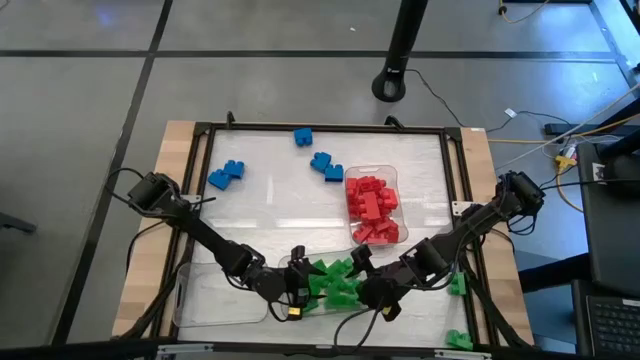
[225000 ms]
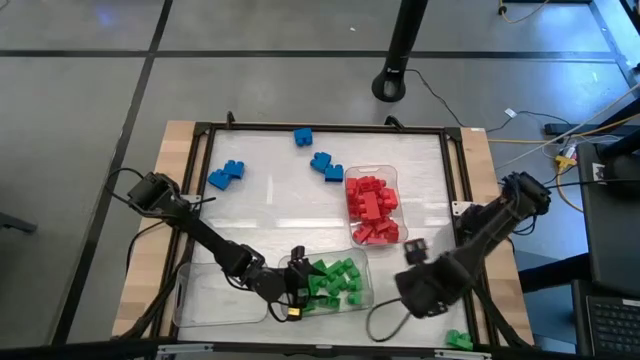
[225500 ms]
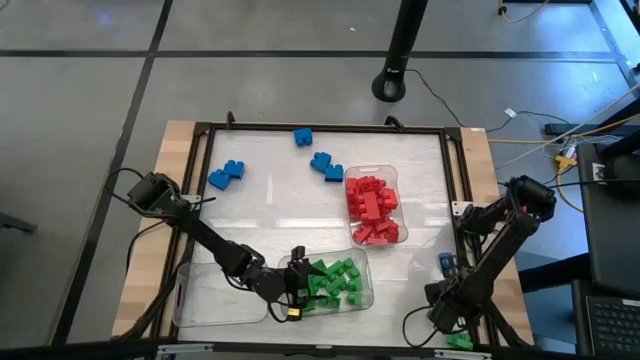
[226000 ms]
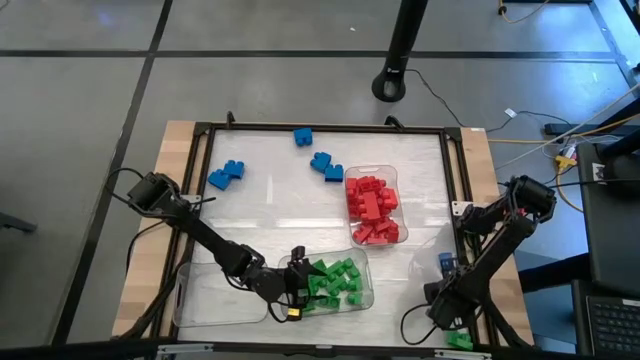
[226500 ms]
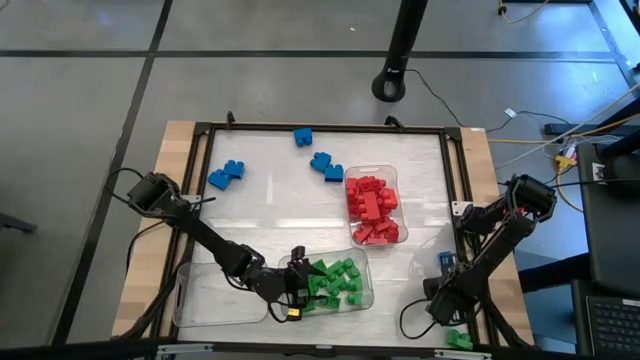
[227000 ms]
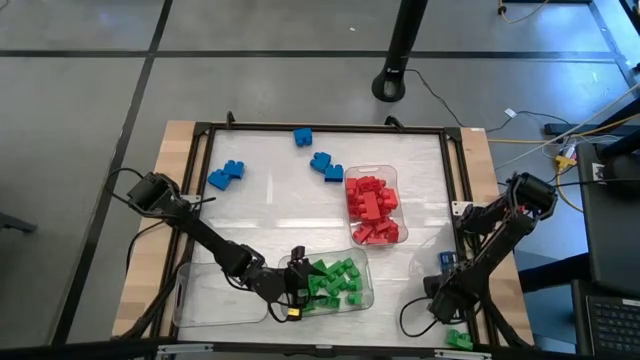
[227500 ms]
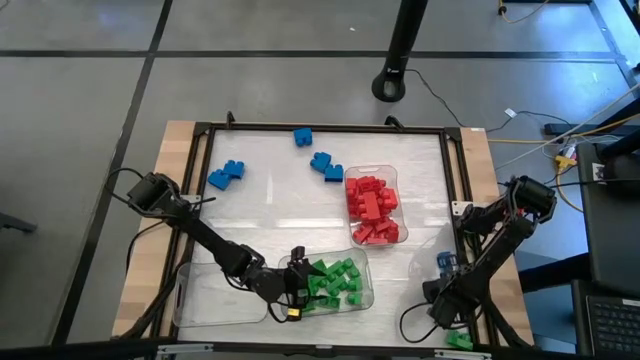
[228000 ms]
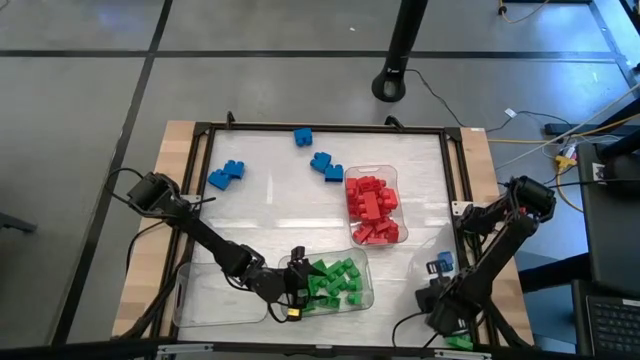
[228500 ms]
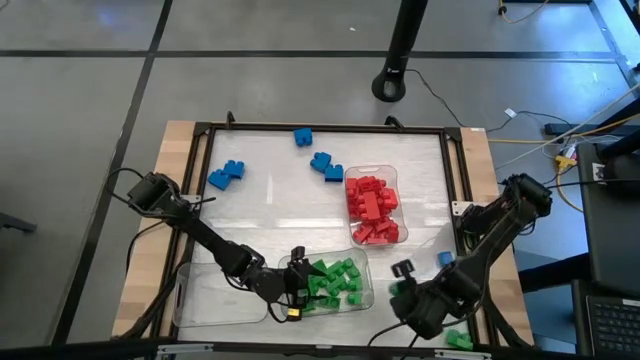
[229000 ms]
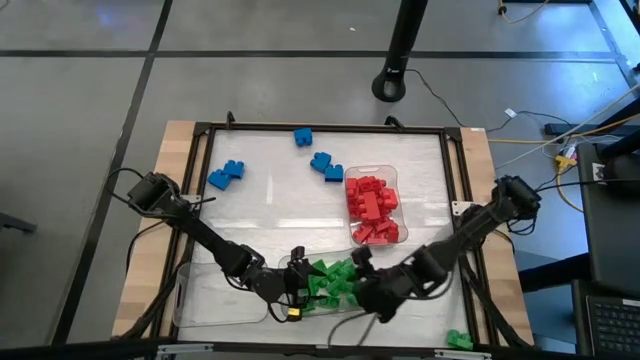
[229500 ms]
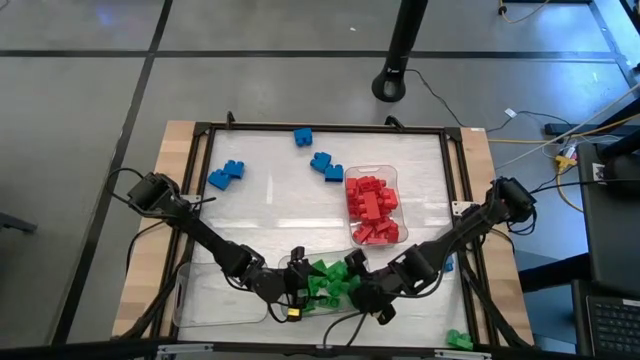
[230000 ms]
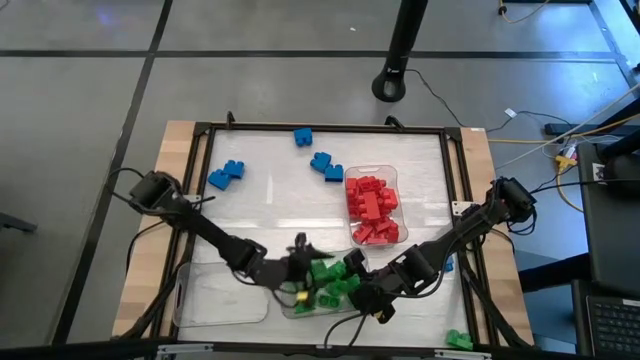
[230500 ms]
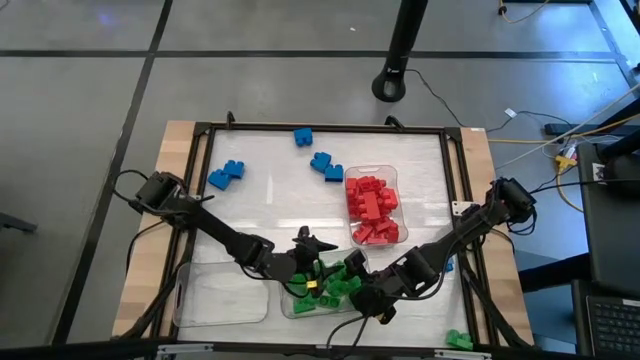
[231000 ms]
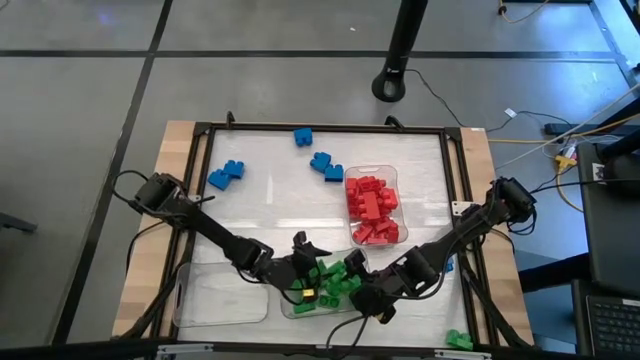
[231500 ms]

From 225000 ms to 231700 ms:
Task: Sort blocks
Put the green game piece into the bottom right transparent bin

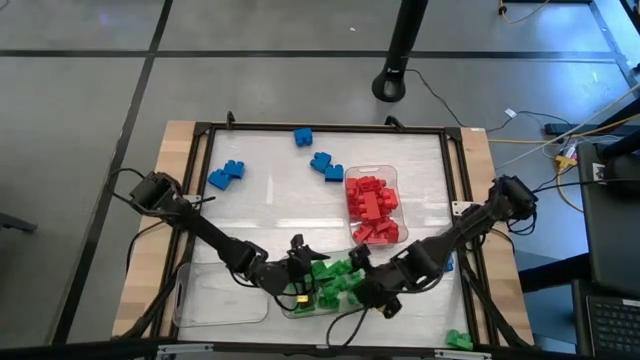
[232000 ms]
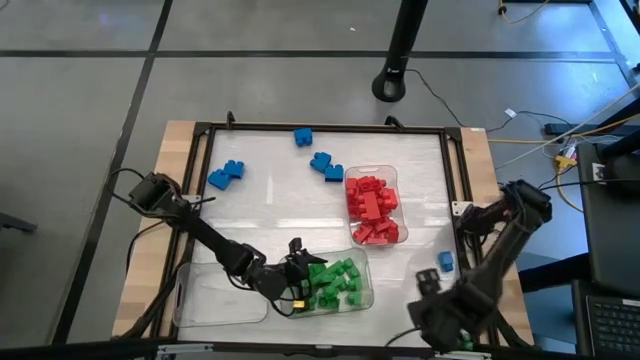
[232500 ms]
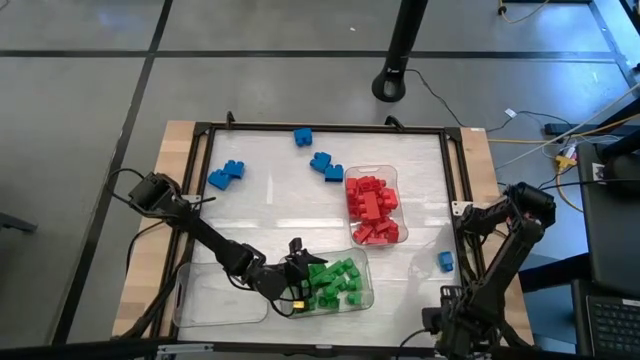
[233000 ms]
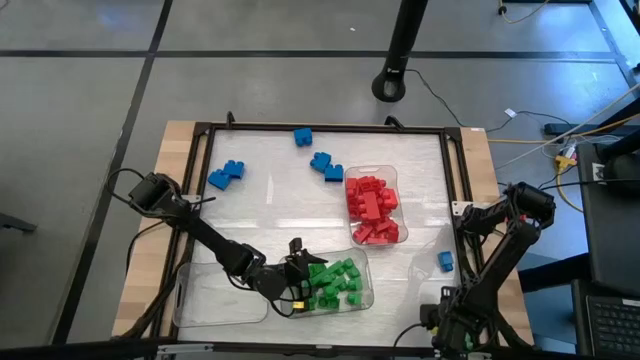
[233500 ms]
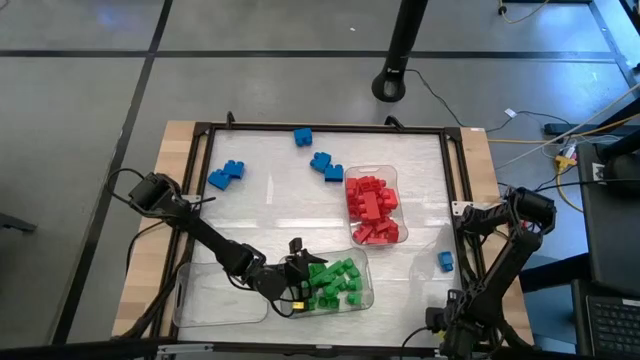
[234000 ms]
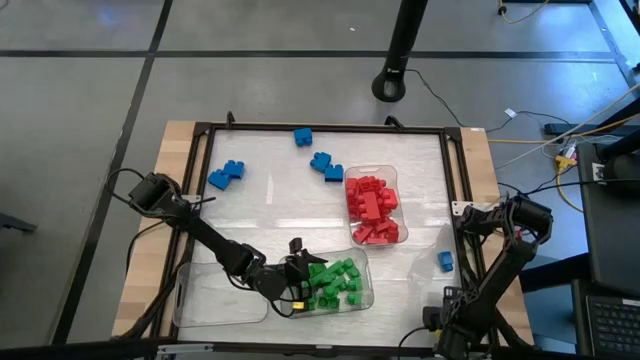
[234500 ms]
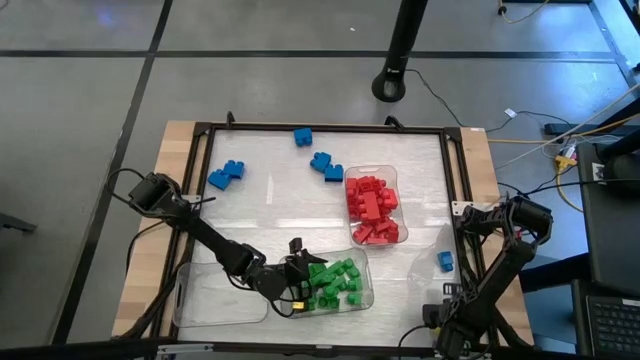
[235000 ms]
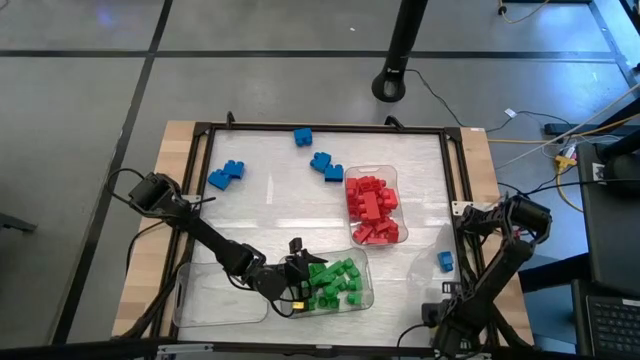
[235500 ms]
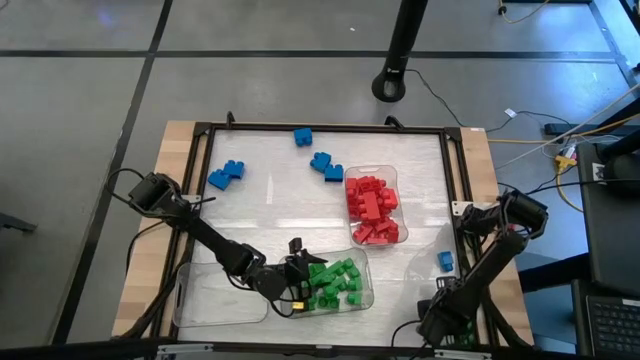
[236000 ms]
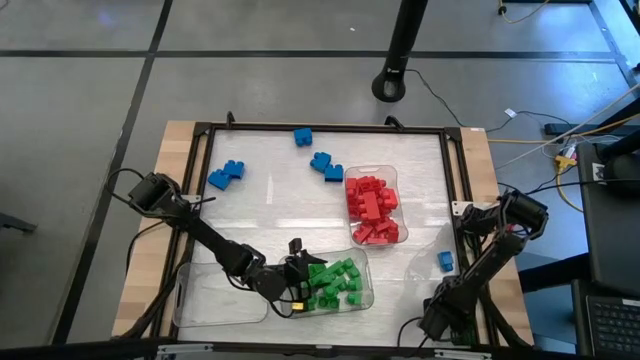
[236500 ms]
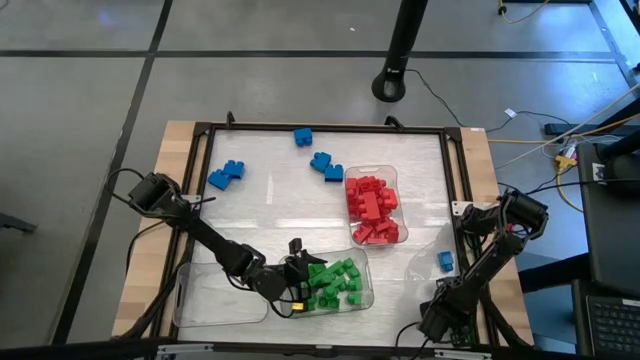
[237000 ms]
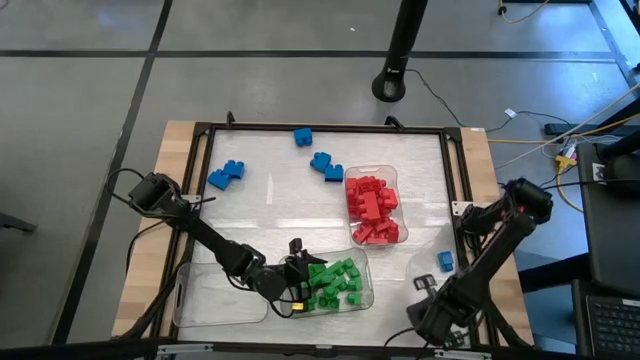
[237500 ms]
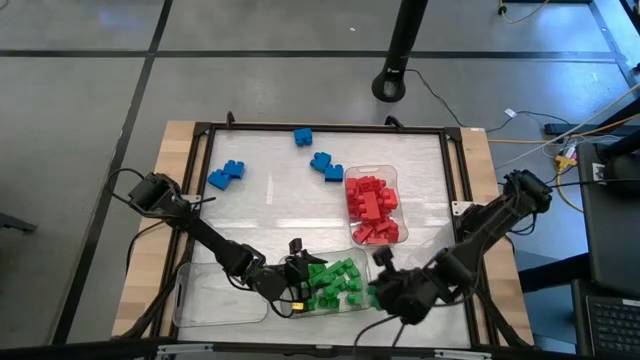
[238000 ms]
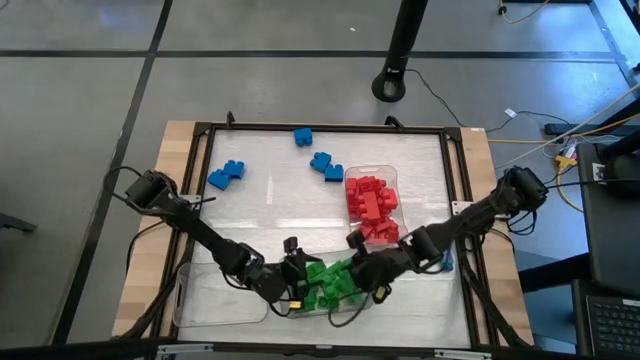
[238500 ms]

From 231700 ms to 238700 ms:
Put the green game piece into the bottom right transparent bin

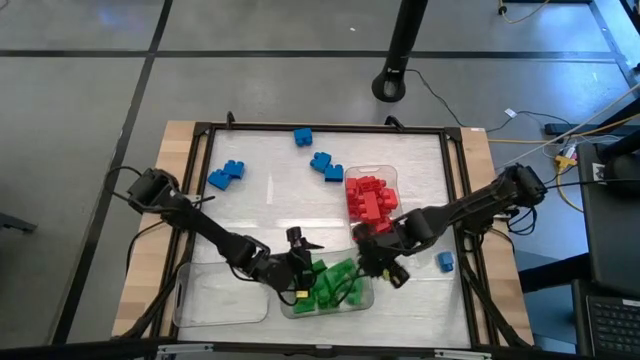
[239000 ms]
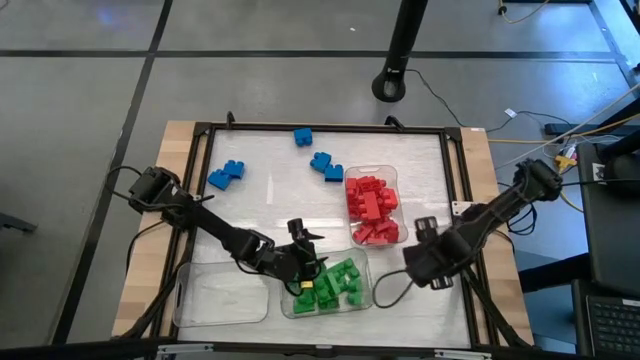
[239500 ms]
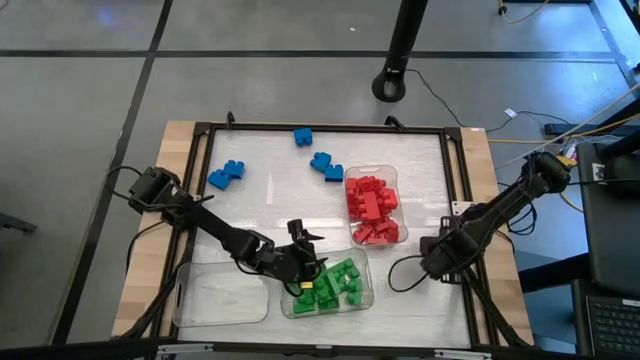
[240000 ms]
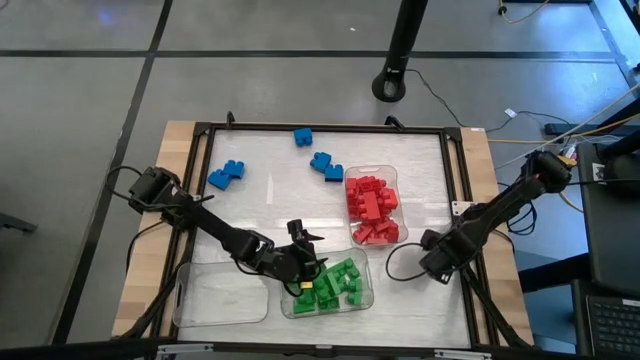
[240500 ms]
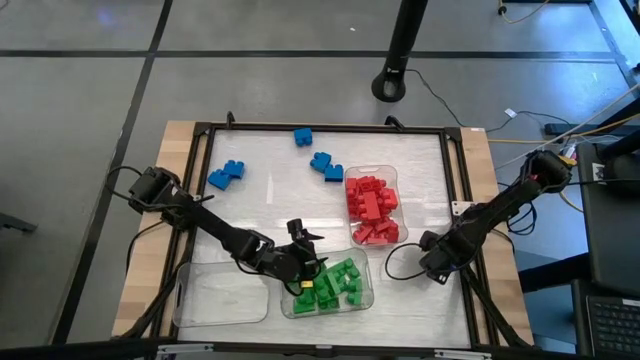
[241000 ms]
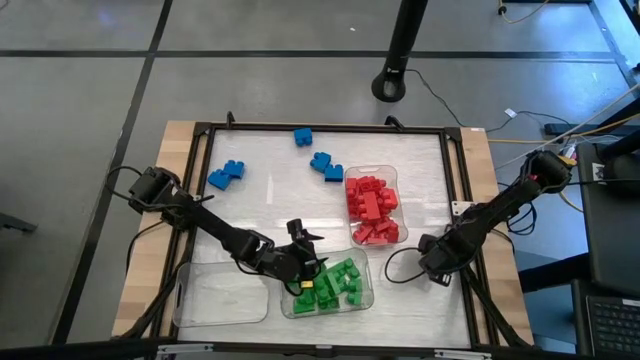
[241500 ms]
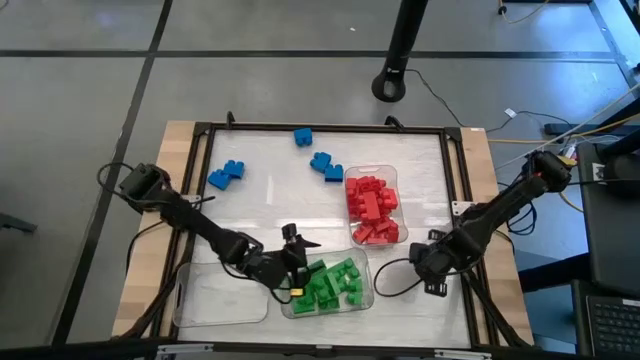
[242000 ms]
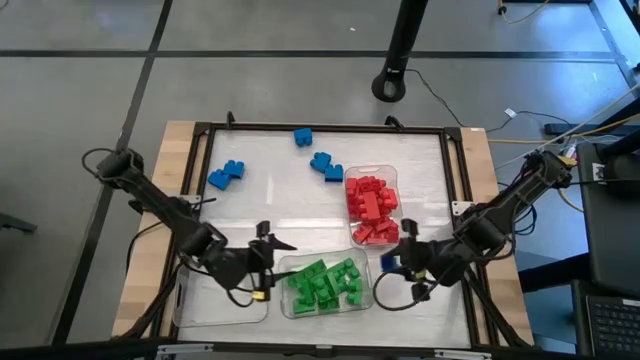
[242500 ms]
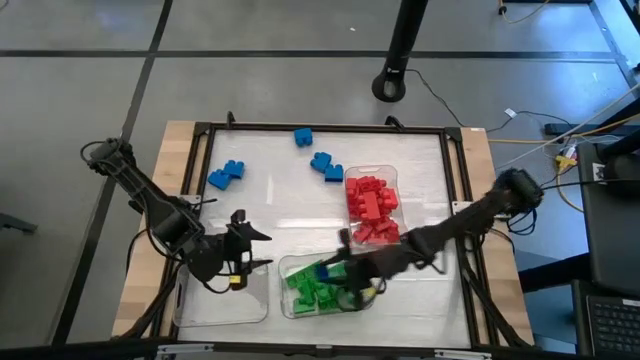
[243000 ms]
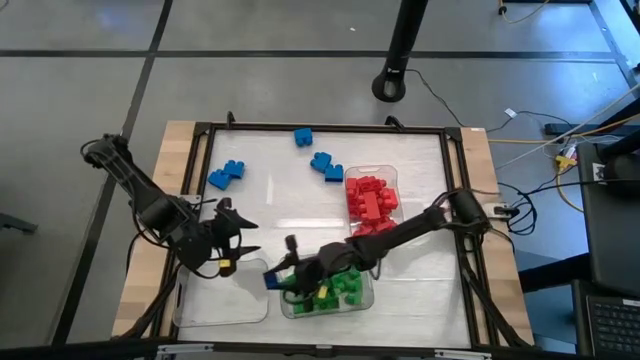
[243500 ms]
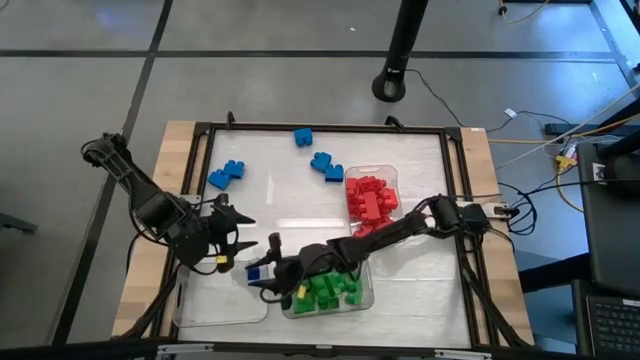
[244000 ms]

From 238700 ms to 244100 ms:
Put the blue game piece into the bottom left transparent bin
